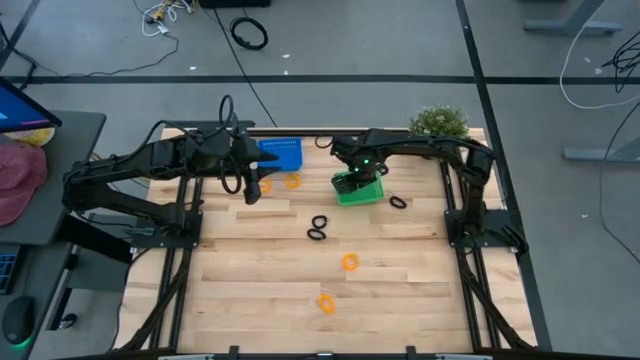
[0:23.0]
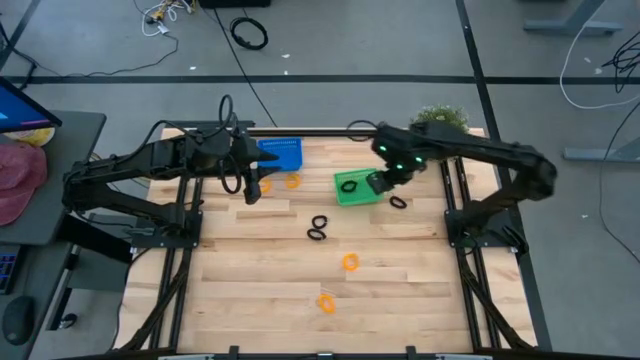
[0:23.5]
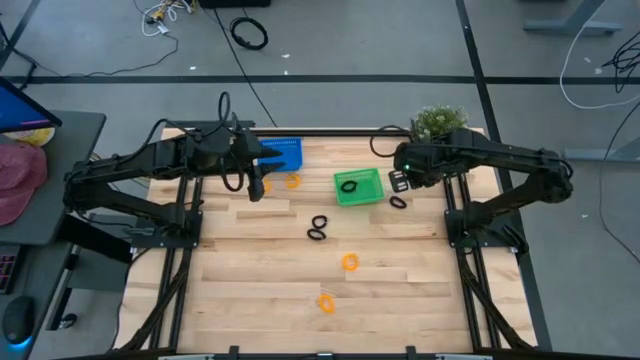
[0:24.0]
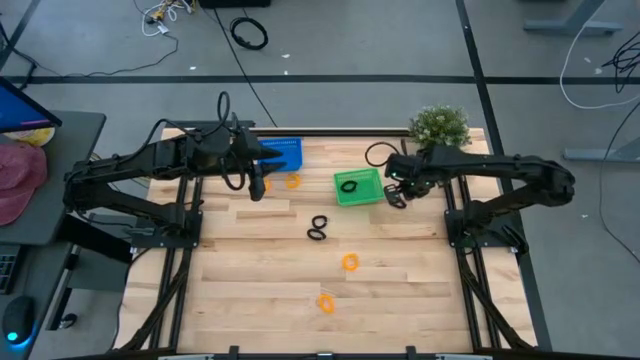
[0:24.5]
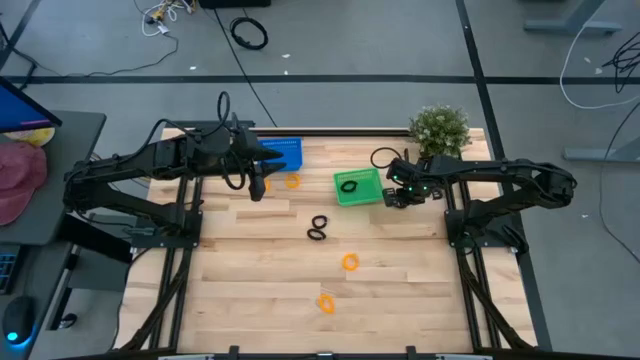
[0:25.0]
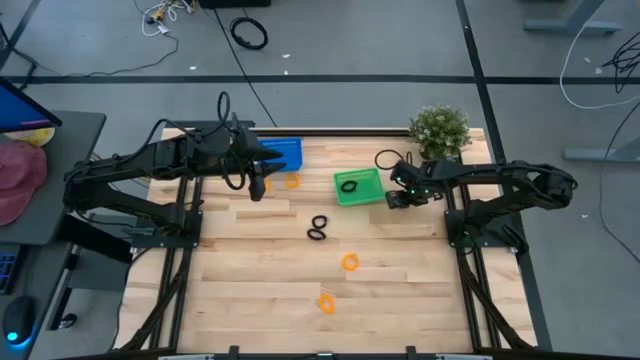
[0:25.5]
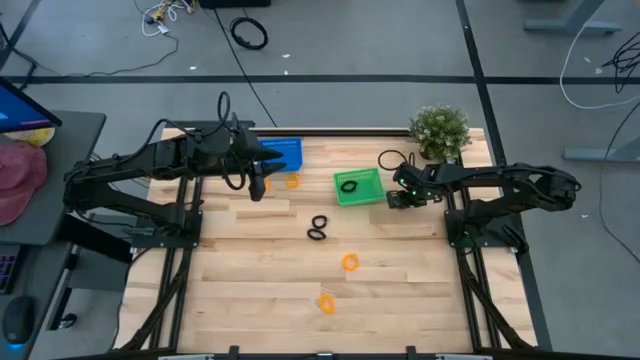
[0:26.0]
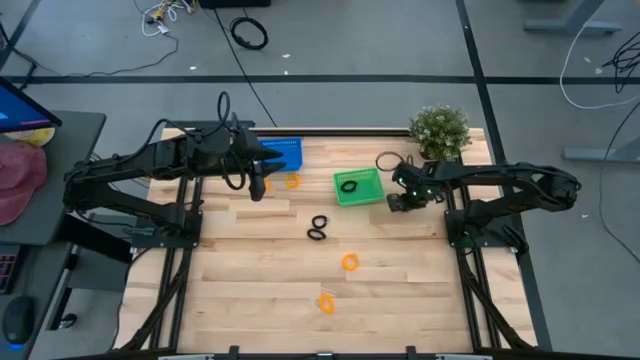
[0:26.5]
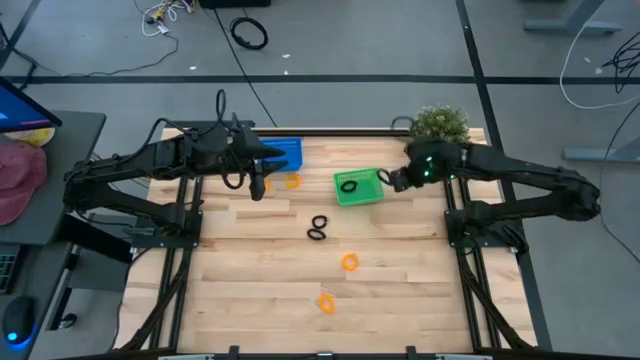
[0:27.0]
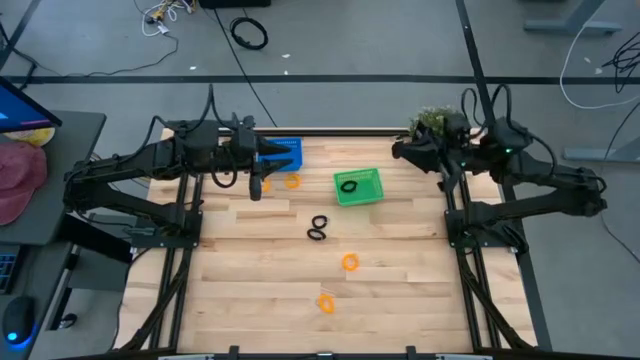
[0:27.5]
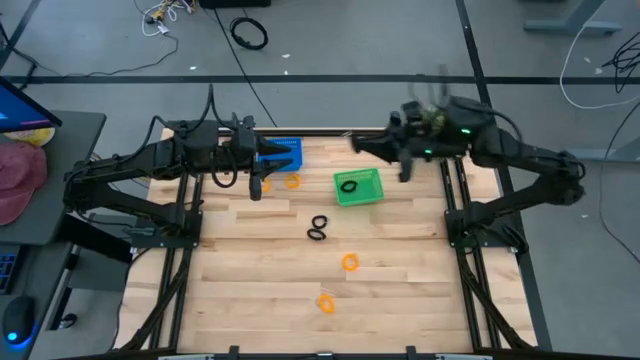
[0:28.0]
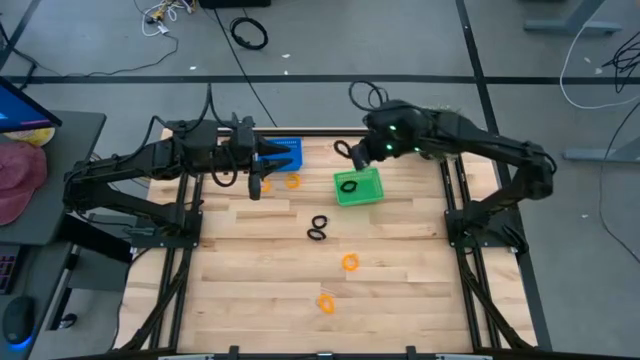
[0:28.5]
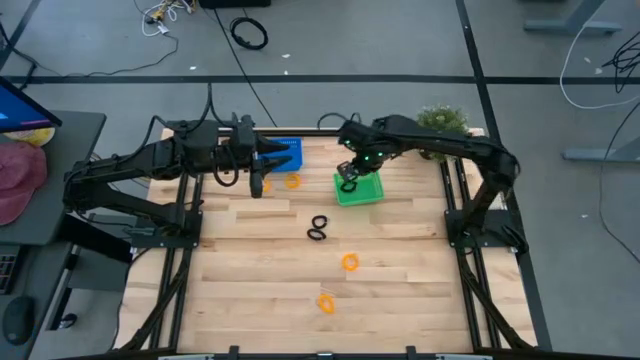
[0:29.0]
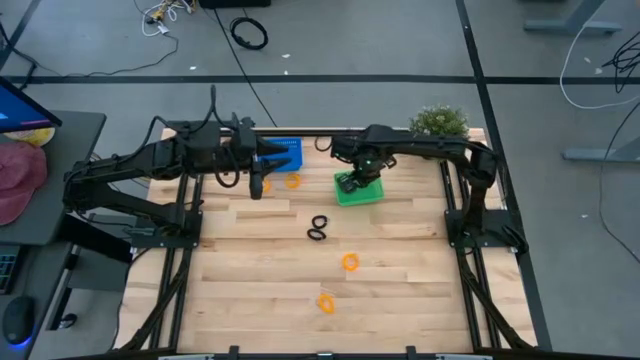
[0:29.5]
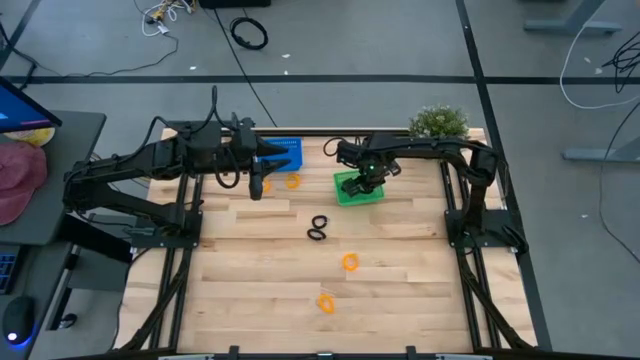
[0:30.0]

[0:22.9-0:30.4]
Task: Sort spring keychains
Put the black spring keychain into the green bin

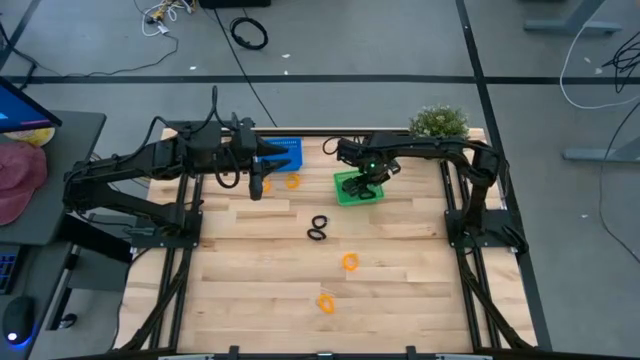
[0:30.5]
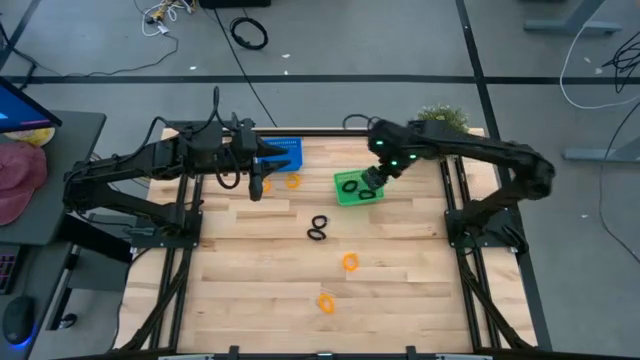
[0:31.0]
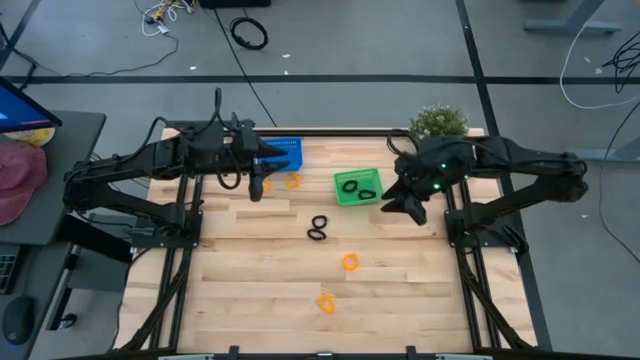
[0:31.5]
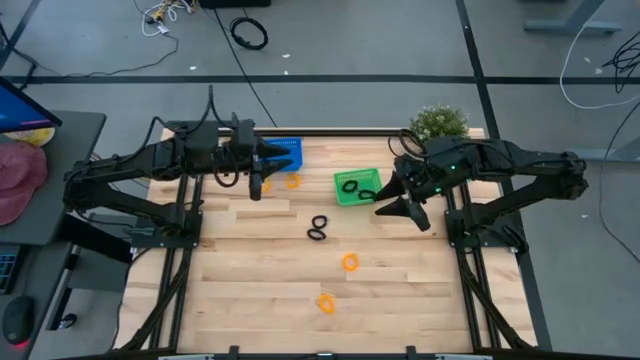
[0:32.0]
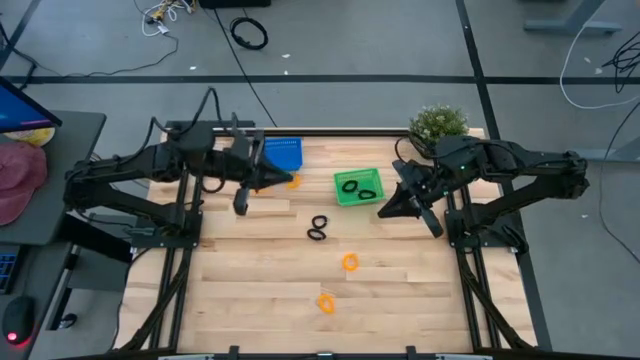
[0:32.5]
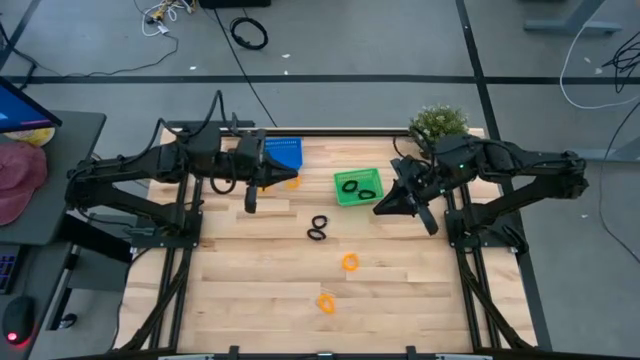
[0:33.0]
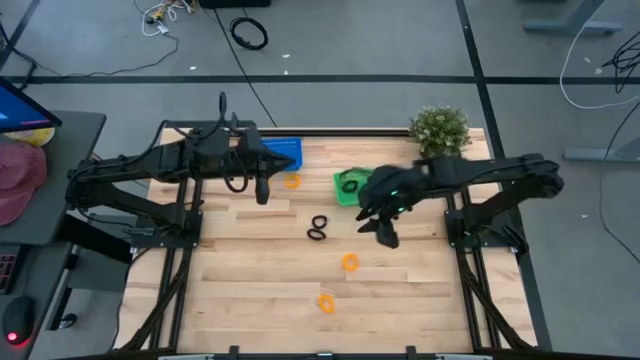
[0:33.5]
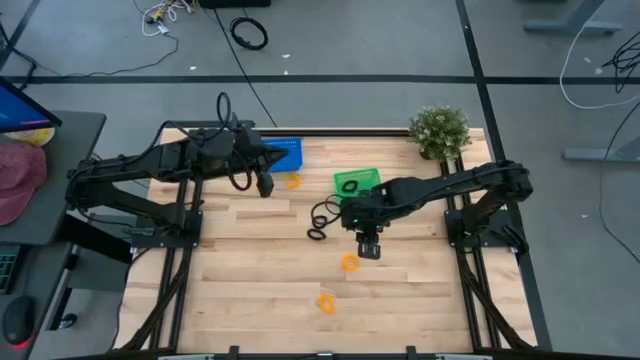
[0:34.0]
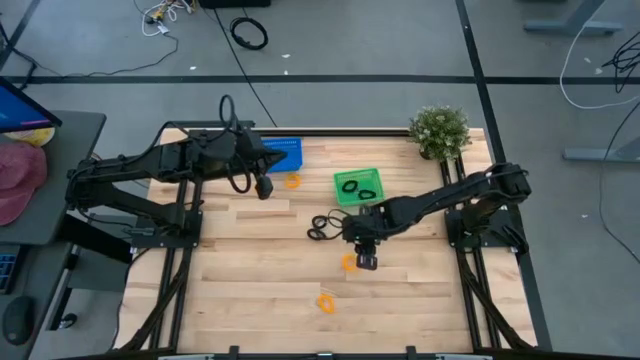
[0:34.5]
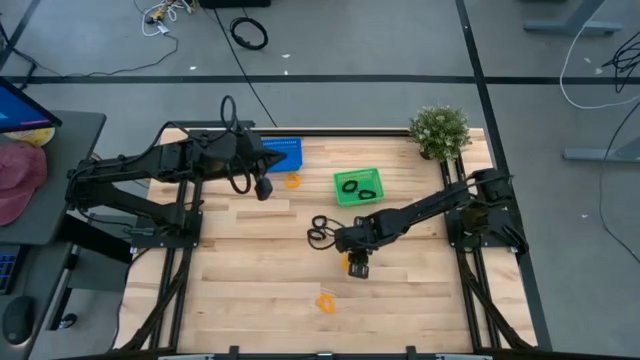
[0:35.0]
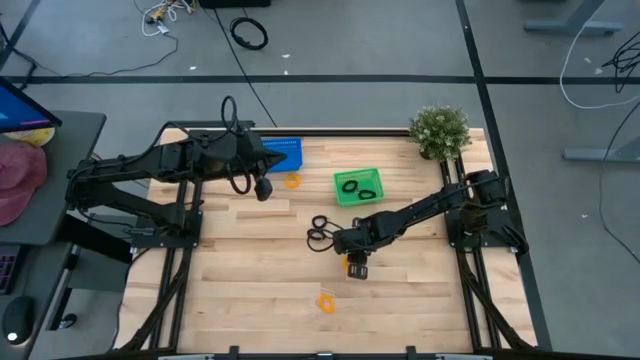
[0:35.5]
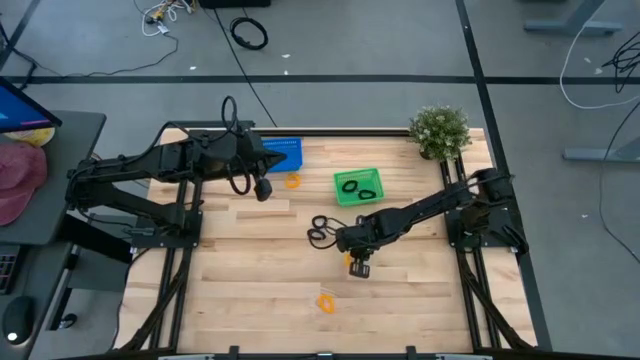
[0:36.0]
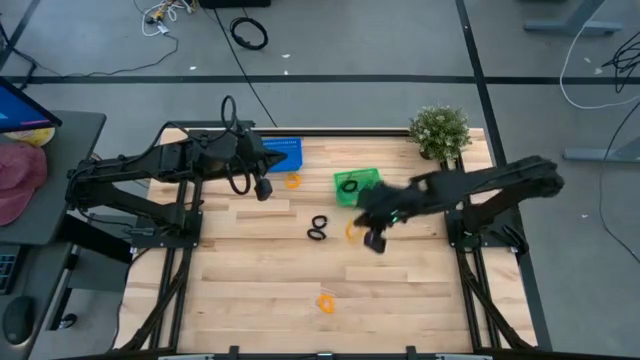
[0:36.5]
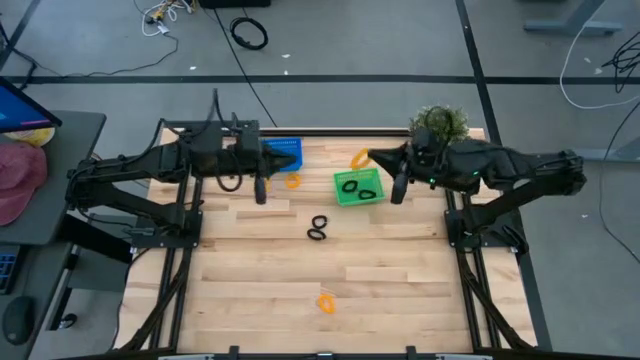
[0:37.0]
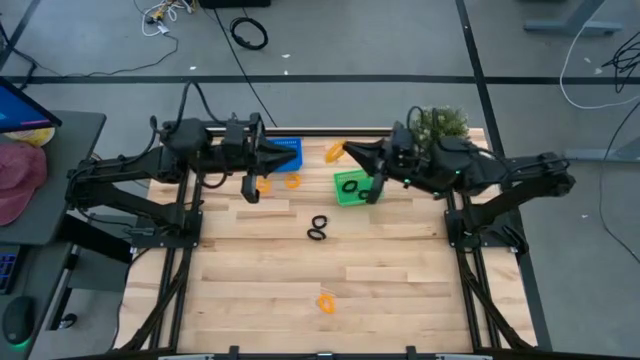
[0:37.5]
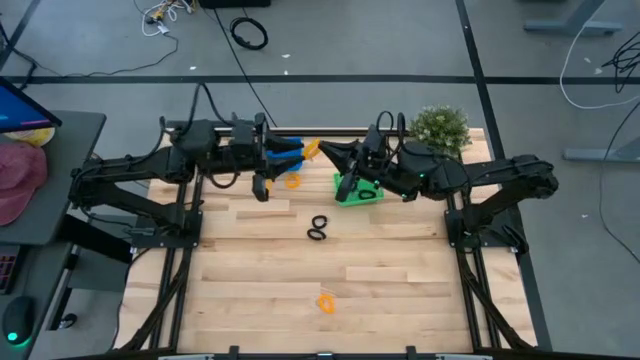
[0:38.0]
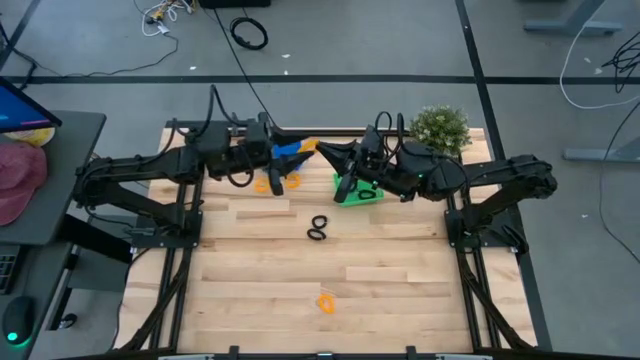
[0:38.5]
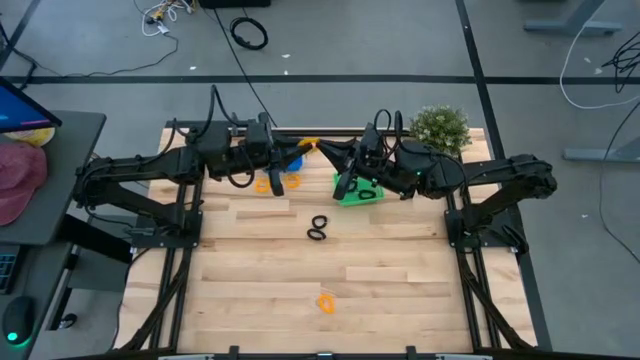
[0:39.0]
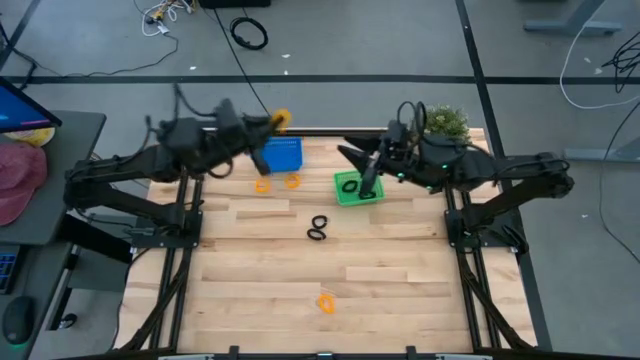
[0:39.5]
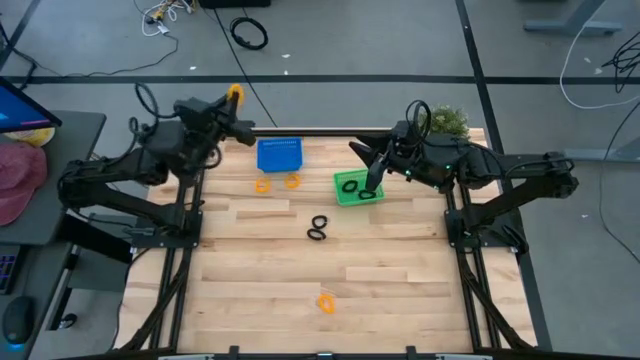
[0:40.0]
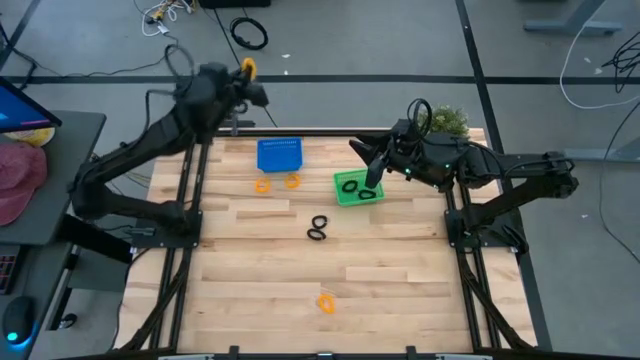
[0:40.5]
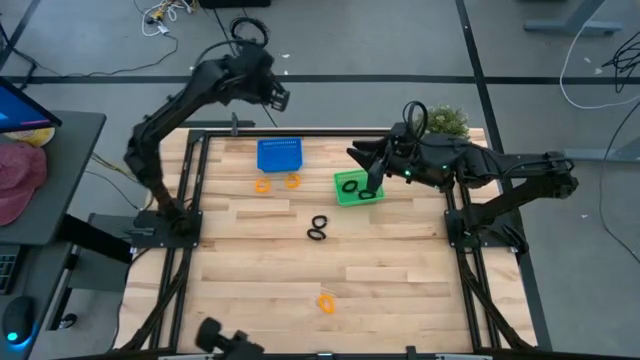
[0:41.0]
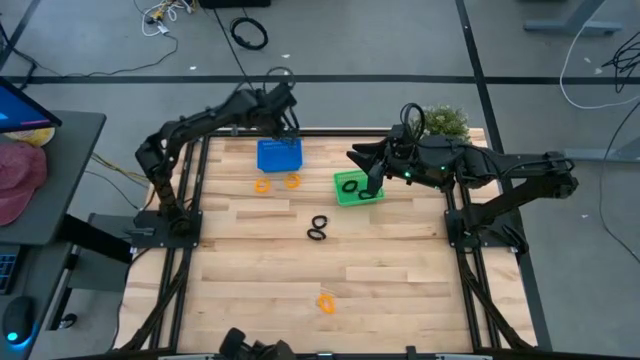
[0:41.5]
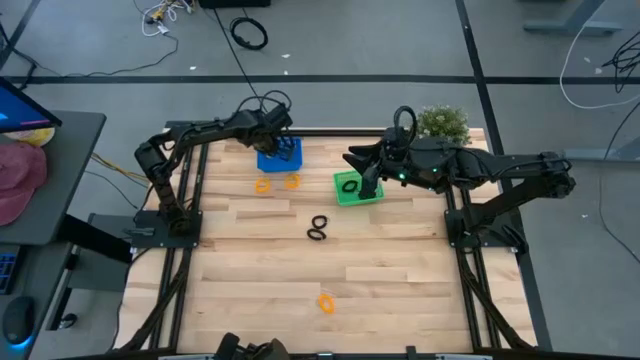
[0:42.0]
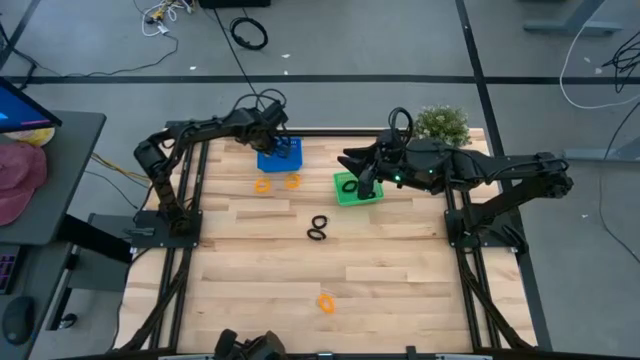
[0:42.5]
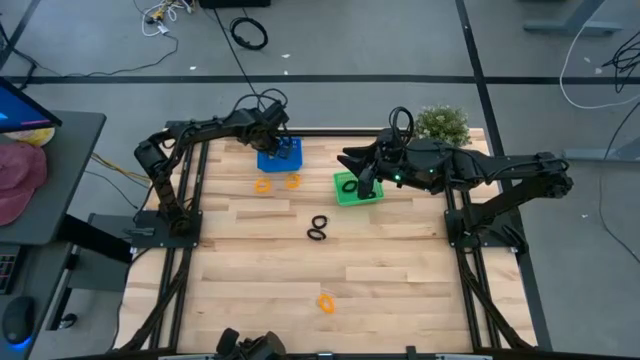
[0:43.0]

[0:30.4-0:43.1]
Put the yellow spring keychain into the blue bin

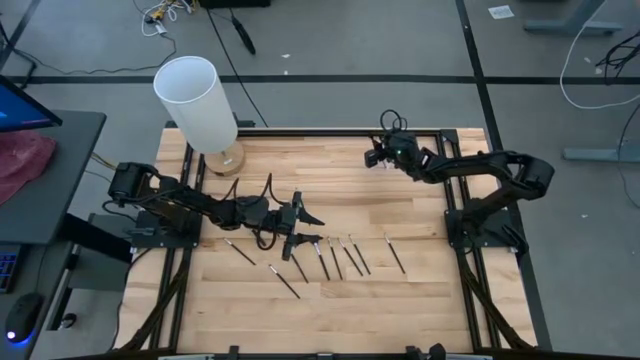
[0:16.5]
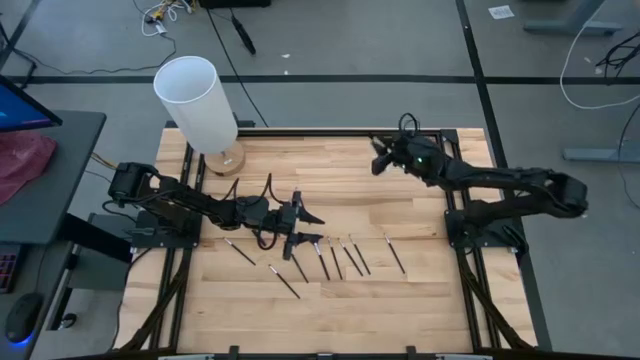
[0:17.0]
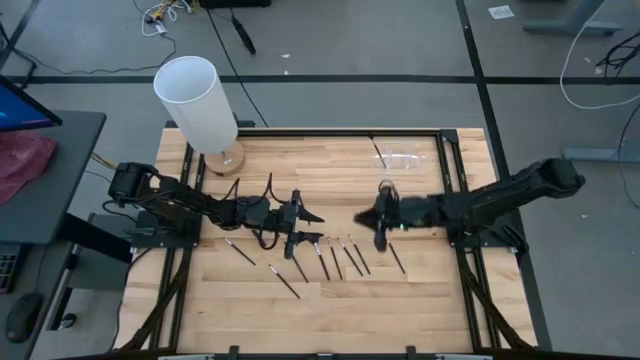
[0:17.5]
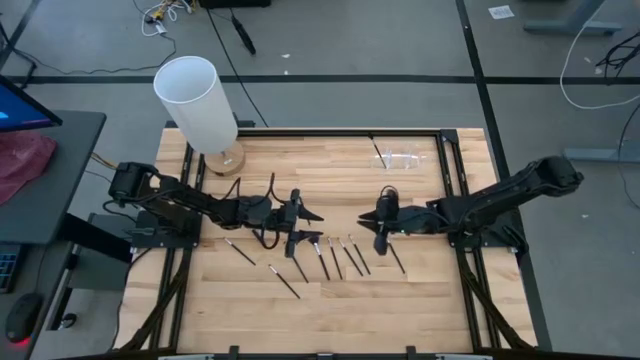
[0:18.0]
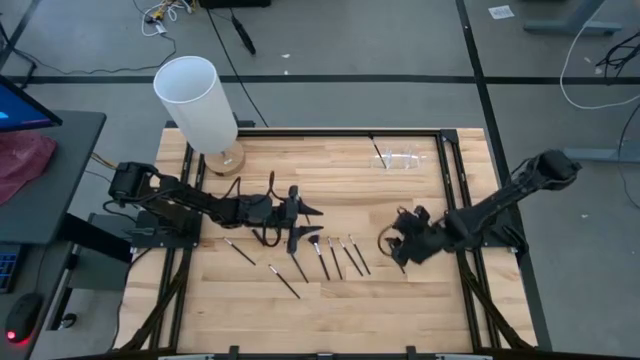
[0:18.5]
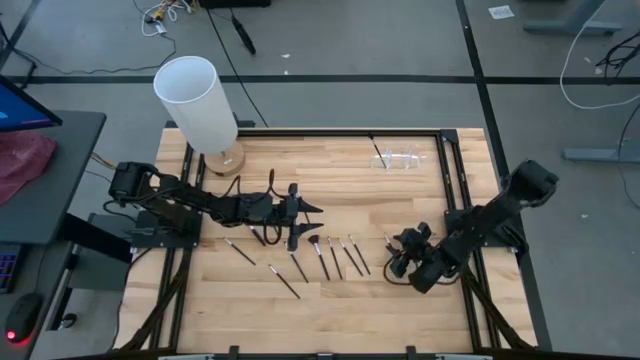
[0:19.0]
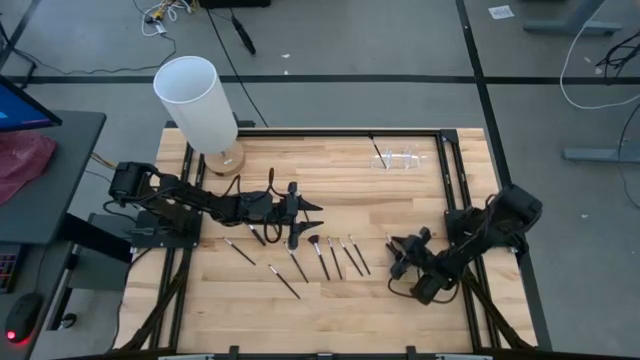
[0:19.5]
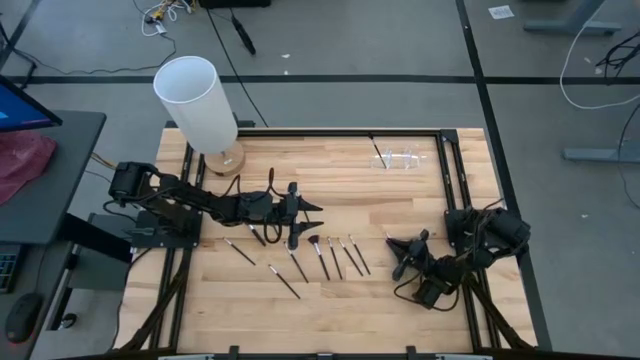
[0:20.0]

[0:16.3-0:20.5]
Task: Put items in baskets/containers
Put the liner brush into the transparent organizer
